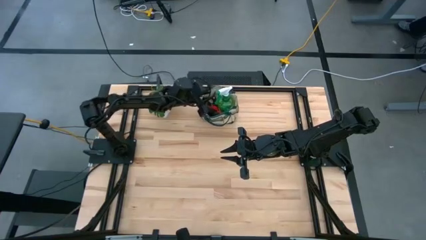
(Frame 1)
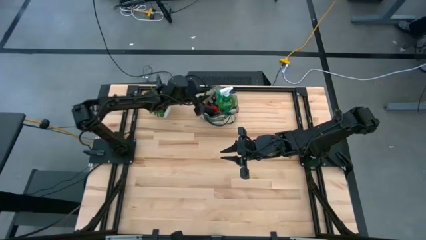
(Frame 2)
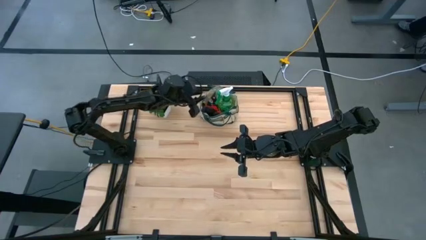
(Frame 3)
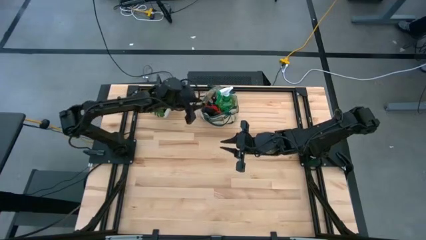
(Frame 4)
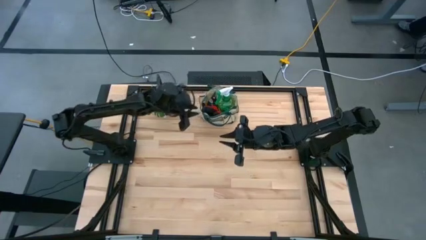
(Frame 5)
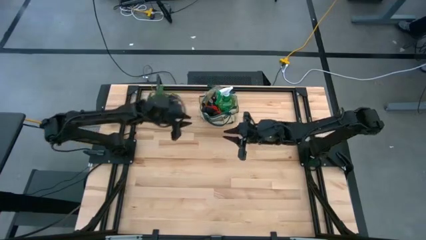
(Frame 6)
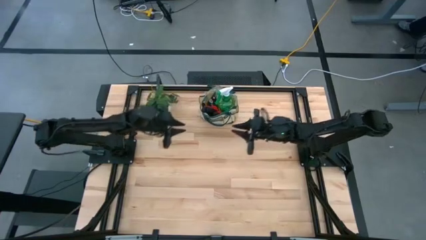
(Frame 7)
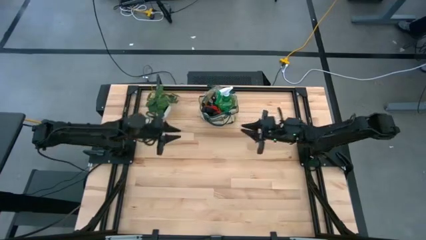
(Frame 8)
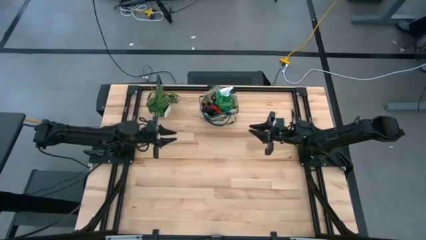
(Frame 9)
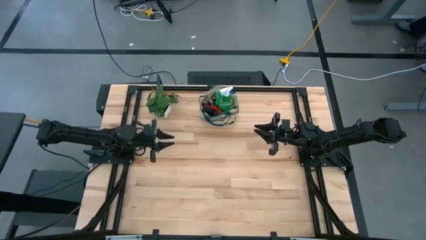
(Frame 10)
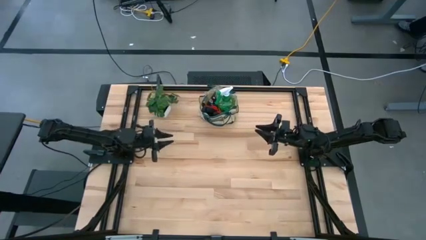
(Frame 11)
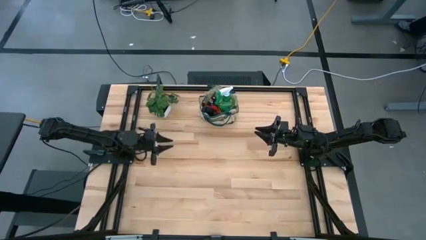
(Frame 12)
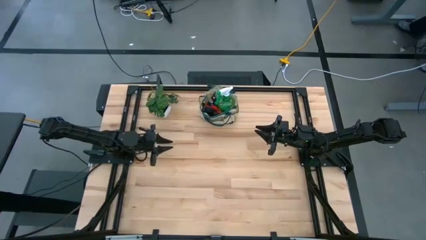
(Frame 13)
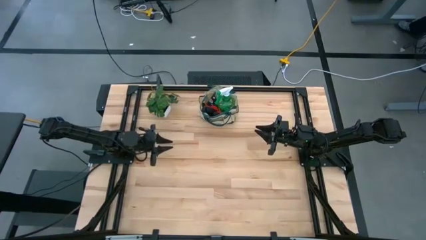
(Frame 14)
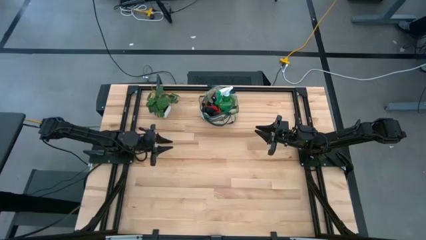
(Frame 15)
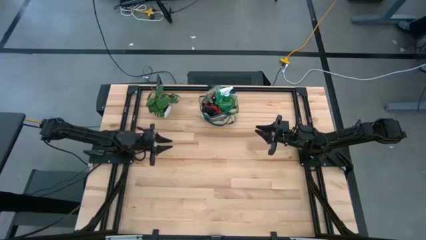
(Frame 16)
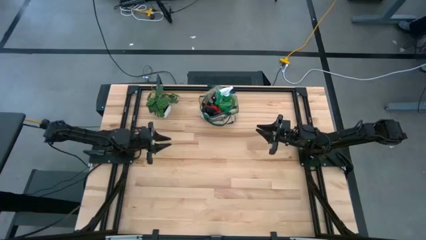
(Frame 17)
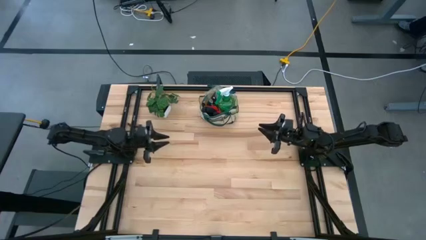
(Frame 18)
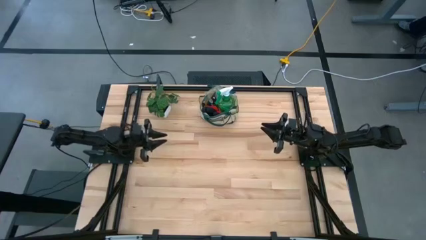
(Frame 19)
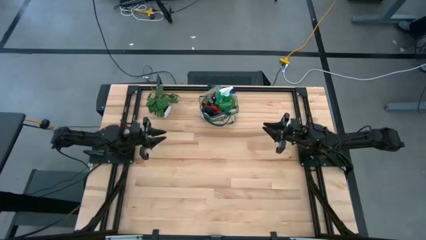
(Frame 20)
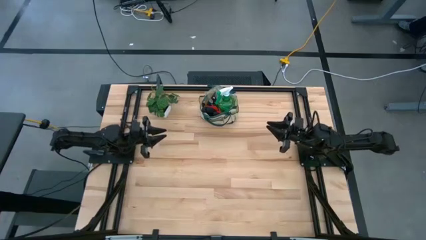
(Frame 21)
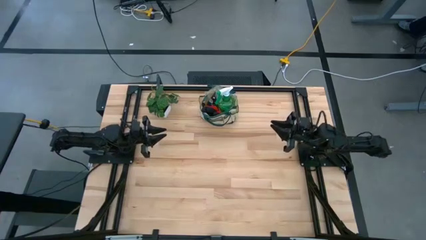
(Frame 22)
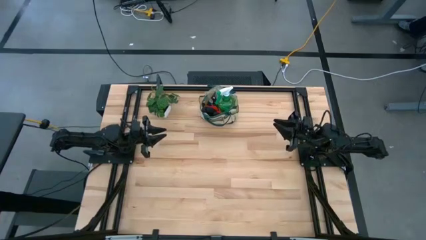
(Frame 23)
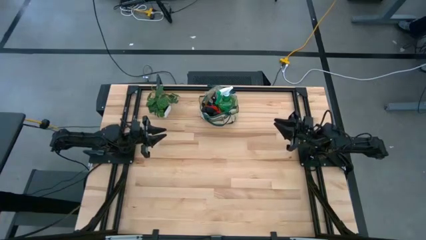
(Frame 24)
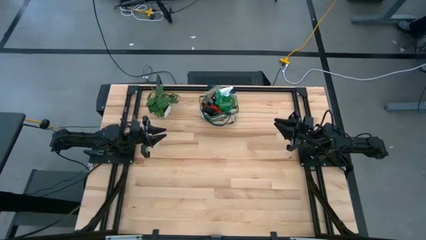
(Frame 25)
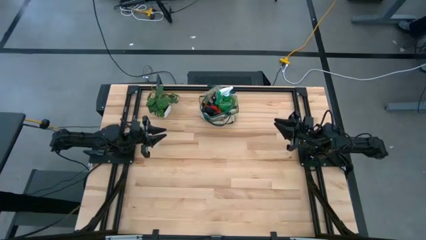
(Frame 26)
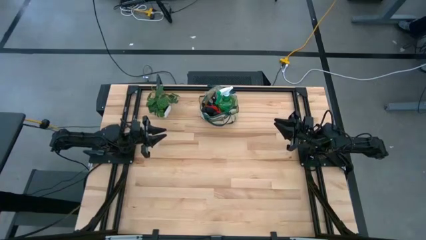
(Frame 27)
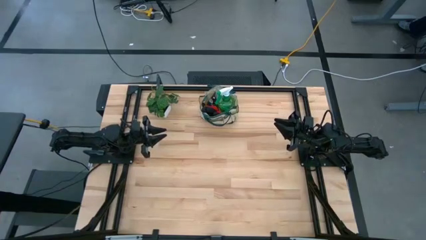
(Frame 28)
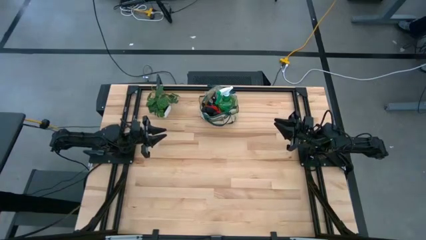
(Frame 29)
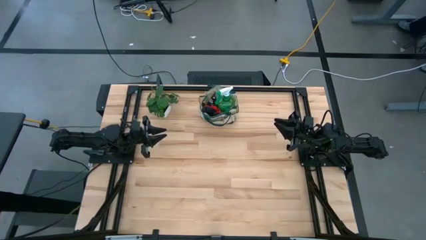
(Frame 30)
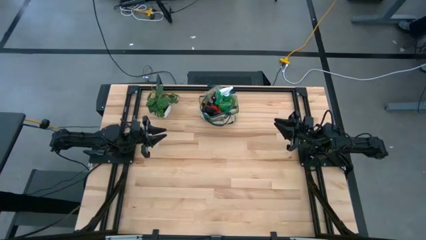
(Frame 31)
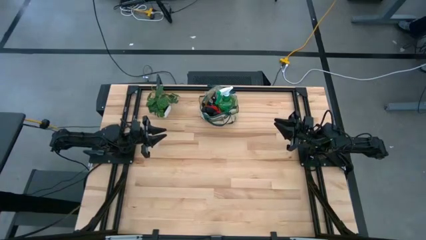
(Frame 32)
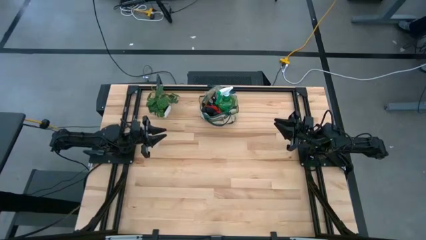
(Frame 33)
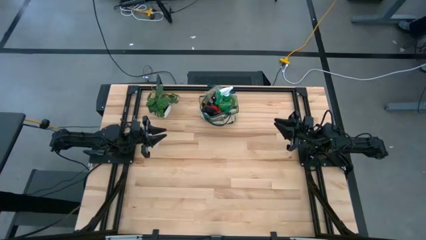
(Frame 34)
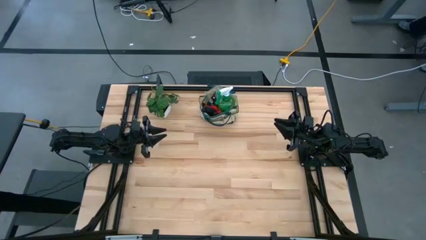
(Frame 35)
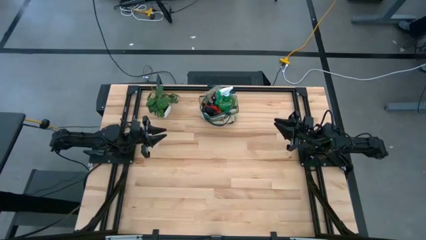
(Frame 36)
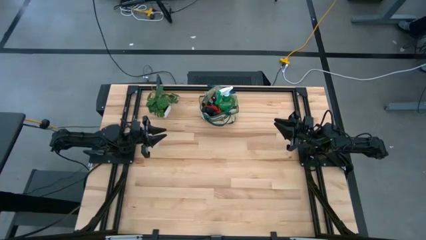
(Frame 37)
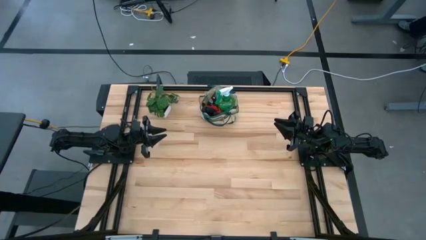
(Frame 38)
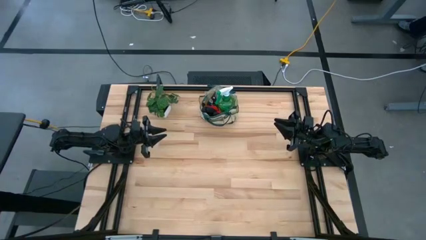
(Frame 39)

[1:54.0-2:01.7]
Task: Pick & Place Garden tools in Gardening bag
Return to Home Position

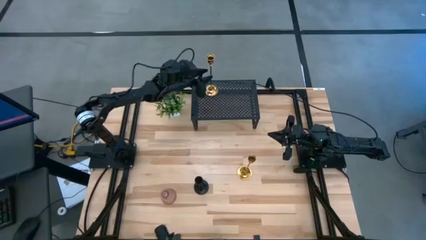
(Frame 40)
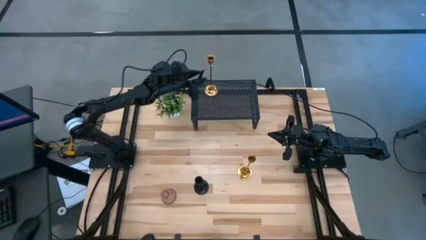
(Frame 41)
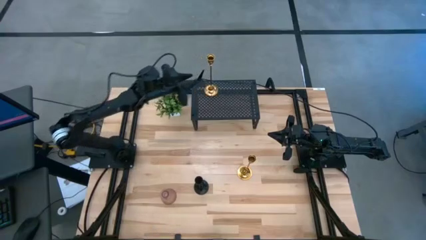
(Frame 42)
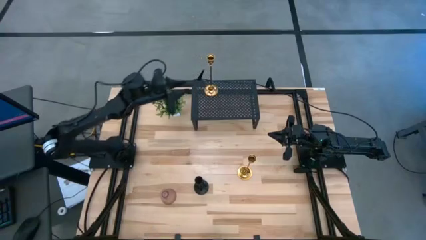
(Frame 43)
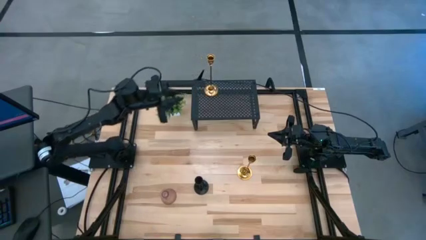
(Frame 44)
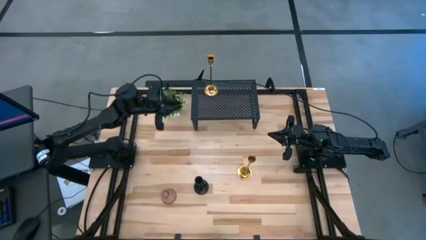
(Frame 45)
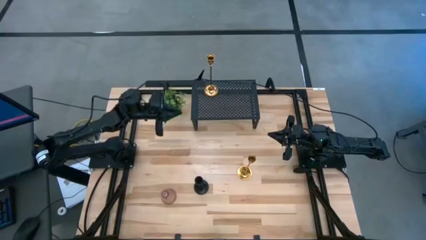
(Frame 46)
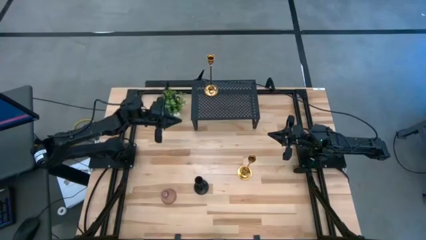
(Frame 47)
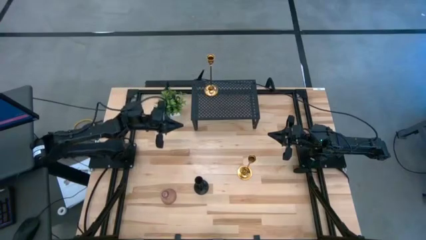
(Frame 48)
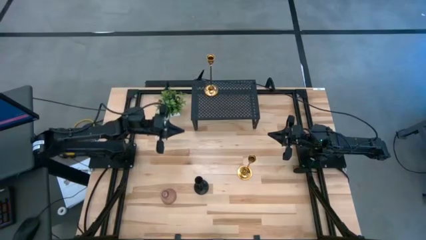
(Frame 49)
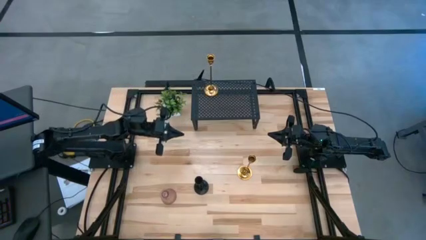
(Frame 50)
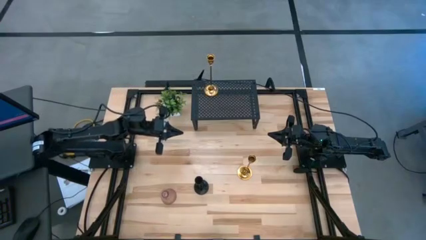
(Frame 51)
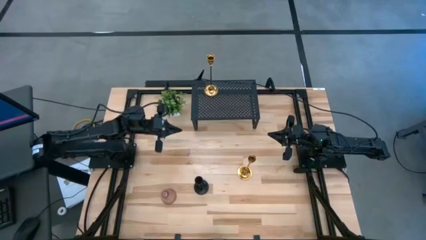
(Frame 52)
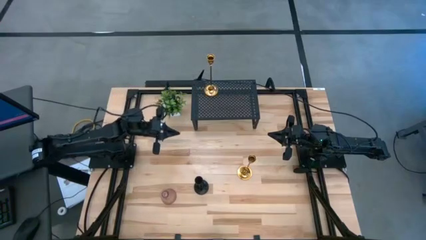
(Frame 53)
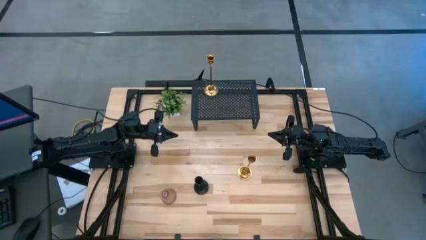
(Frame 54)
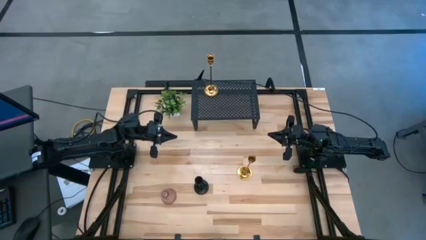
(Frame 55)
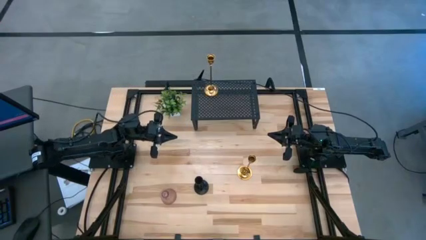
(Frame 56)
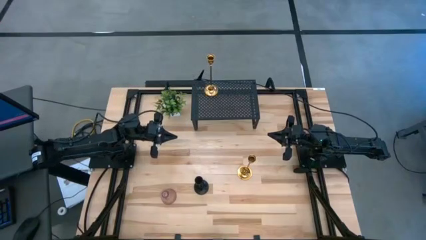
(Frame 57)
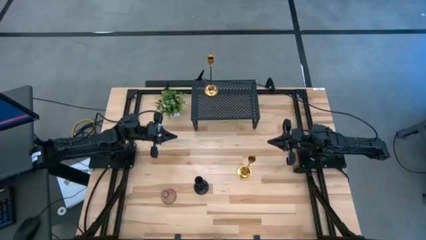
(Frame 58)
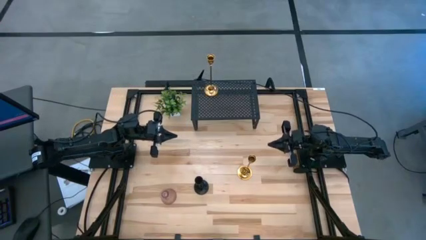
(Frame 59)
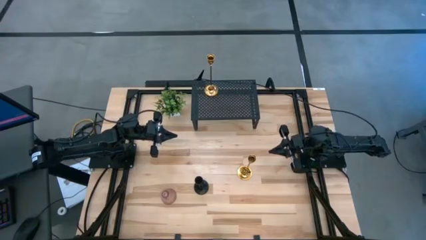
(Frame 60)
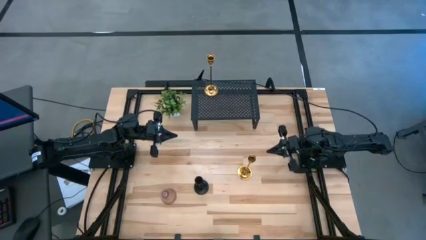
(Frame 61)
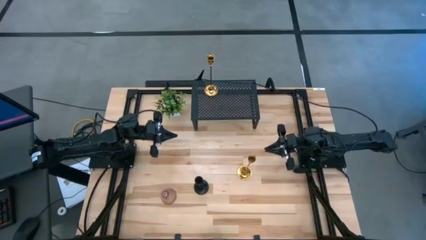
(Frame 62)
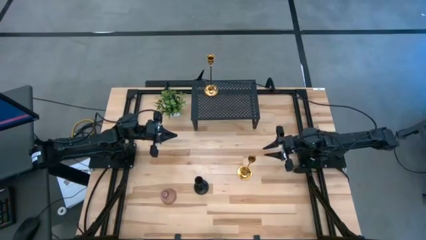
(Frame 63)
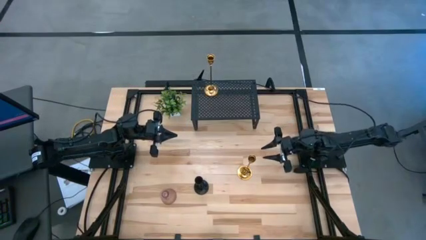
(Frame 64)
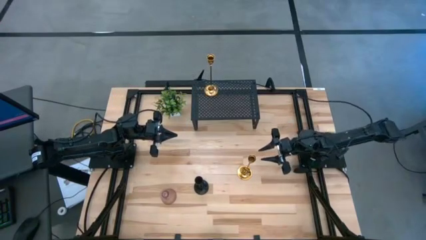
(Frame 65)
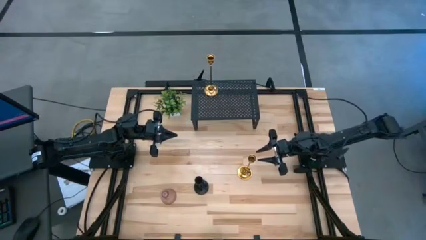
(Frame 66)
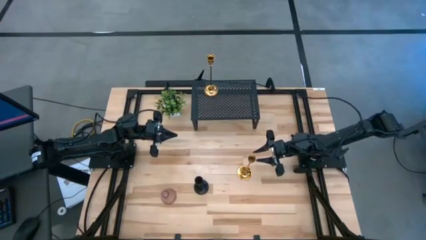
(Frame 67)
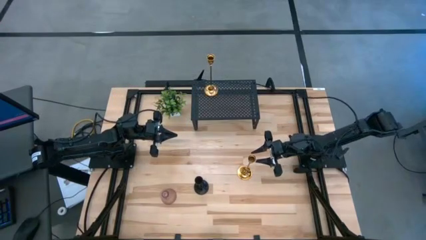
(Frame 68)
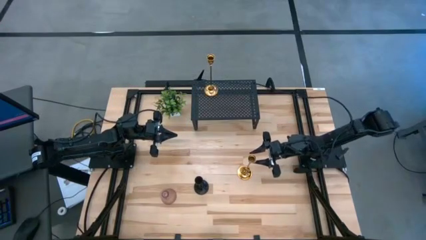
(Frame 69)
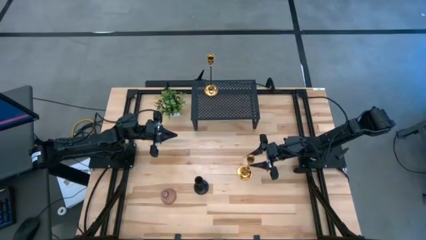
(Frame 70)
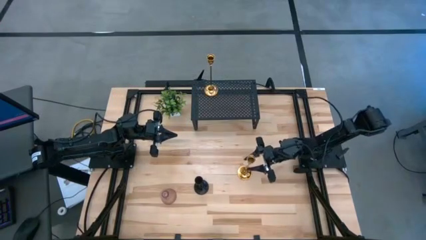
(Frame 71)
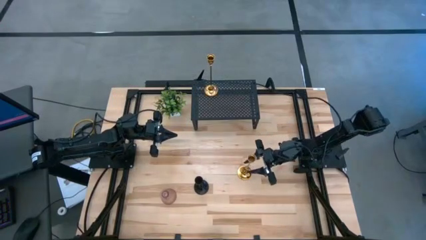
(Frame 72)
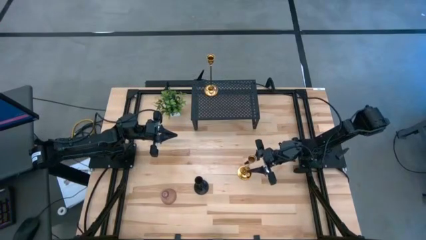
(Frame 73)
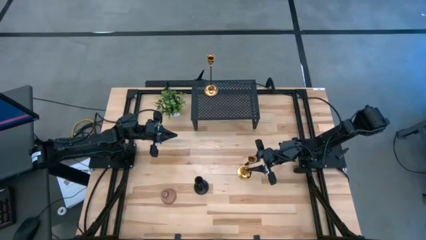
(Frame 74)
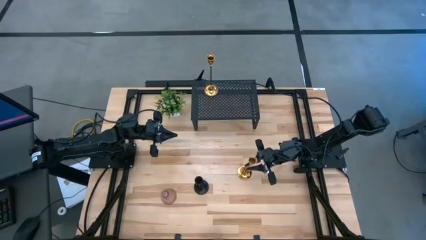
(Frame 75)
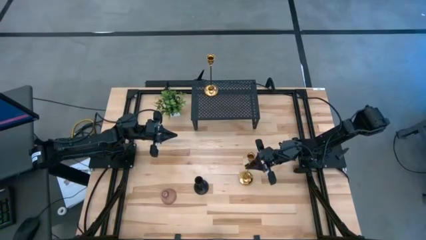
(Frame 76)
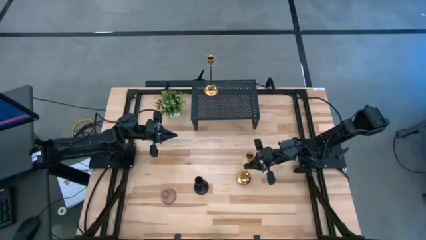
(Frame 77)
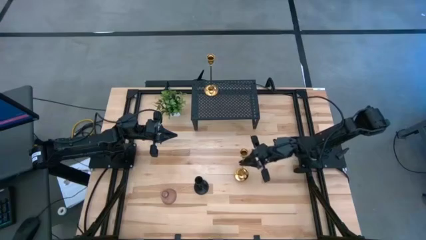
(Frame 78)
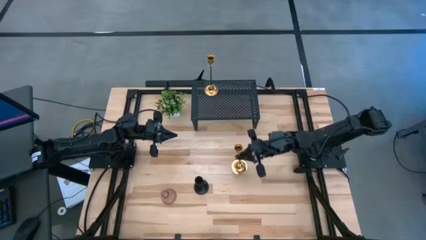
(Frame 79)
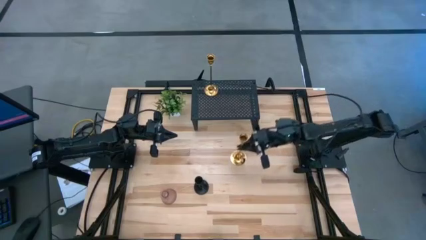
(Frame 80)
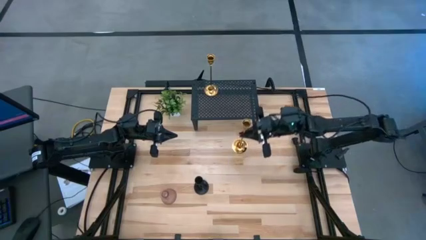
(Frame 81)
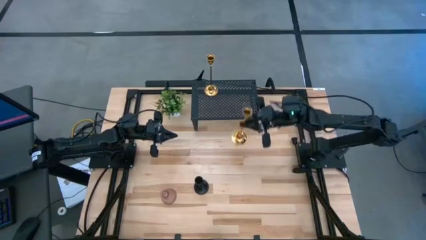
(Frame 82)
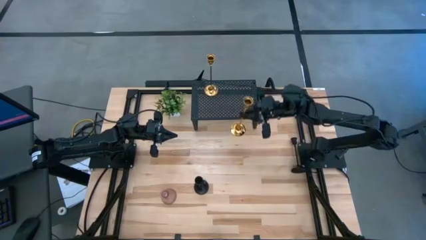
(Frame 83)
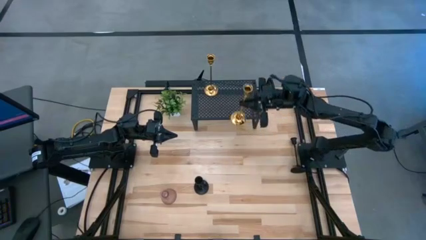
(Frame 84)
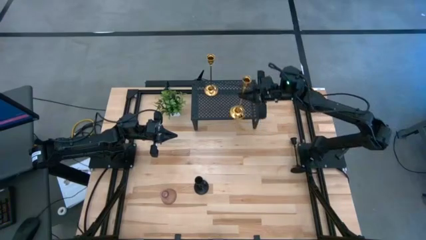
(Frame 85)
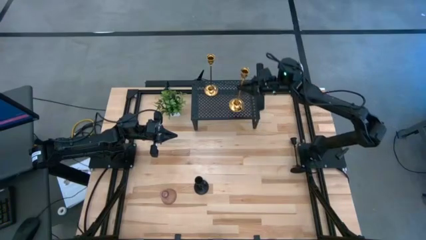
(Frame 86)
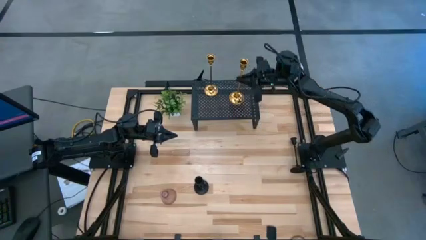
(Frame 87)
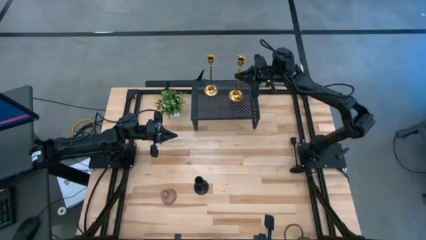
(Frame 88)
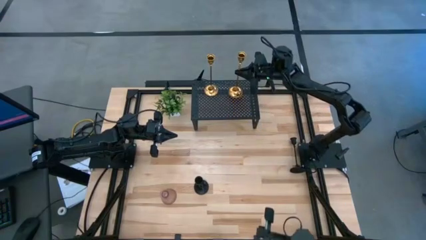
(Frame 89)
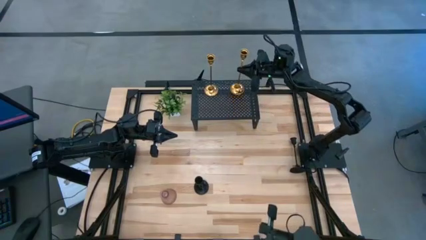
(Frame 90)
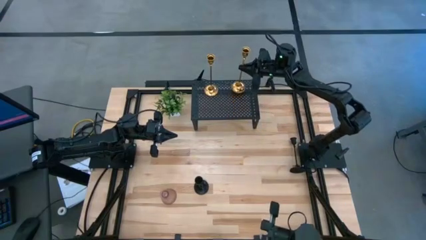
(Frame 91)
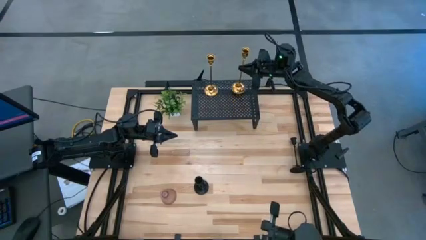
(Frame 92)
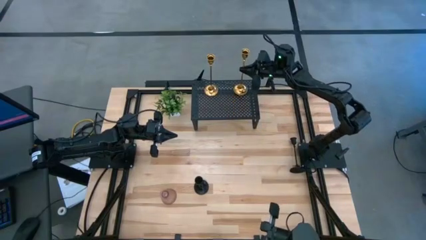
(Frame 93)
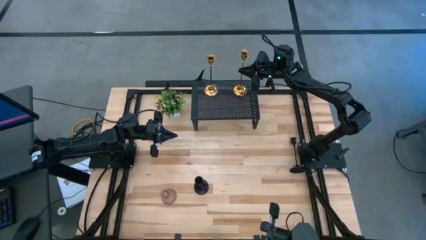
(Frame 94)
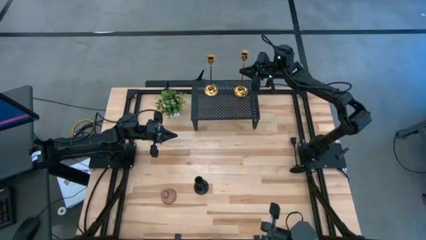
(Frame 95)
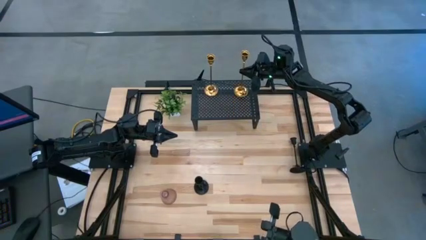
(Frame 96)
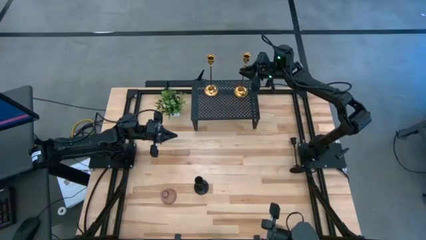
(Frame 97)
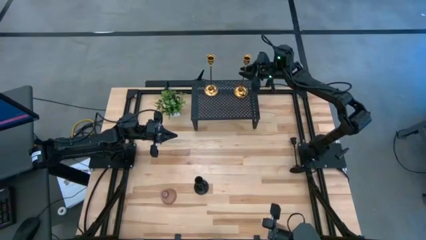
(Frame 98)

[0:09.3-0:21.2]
Task: Pick & Place candle stick holders
Put the golden candle holder on the shelf
